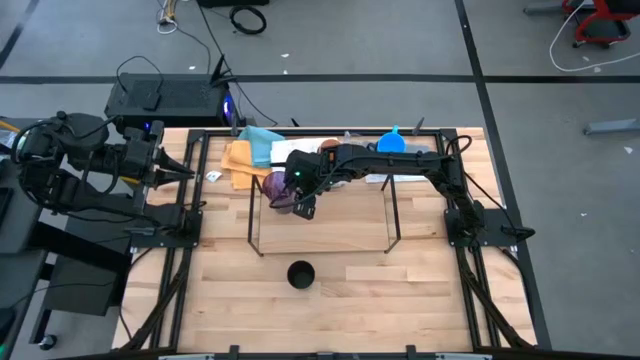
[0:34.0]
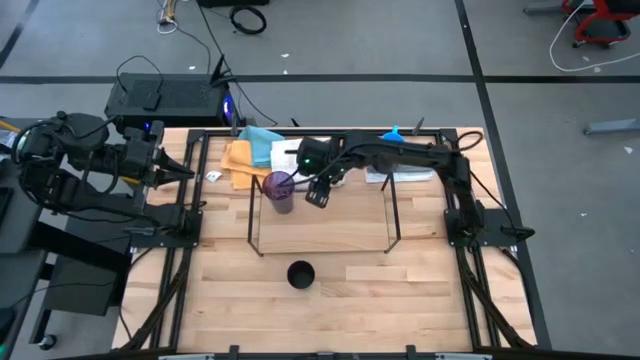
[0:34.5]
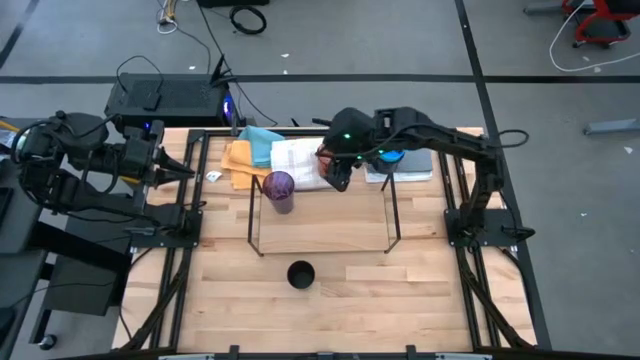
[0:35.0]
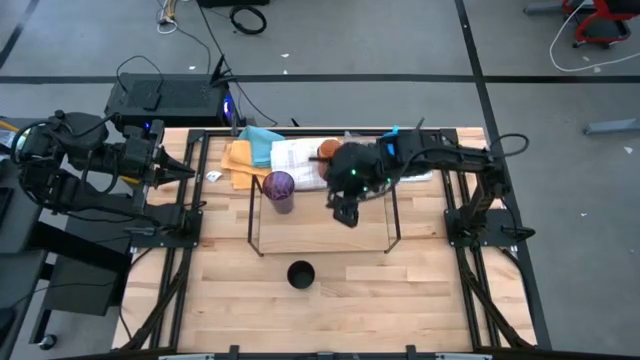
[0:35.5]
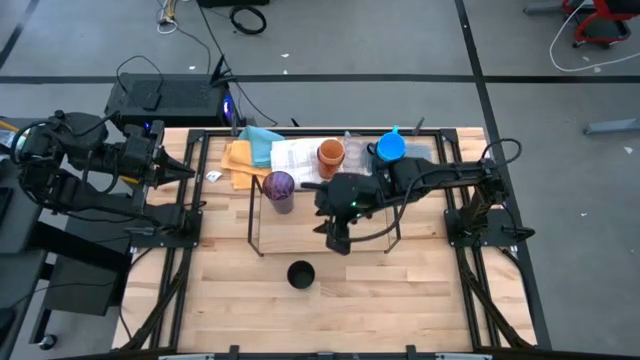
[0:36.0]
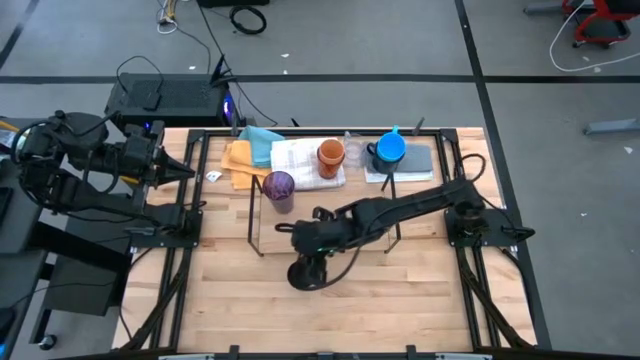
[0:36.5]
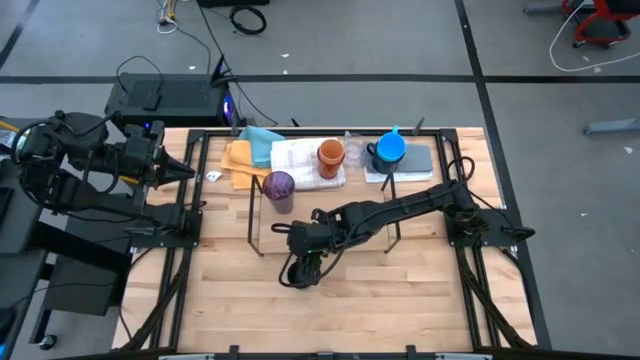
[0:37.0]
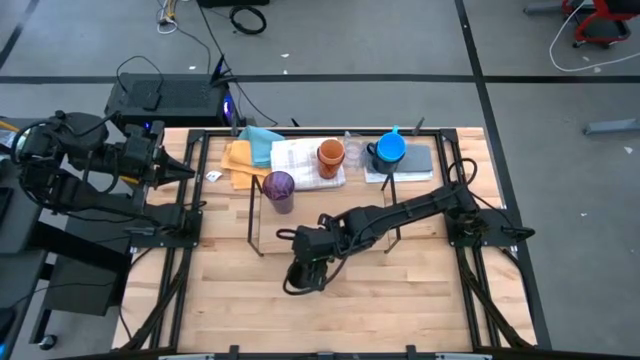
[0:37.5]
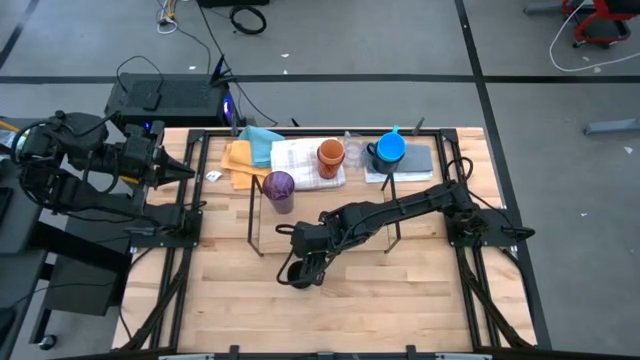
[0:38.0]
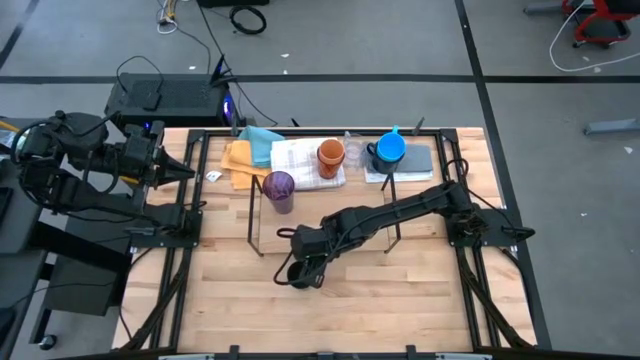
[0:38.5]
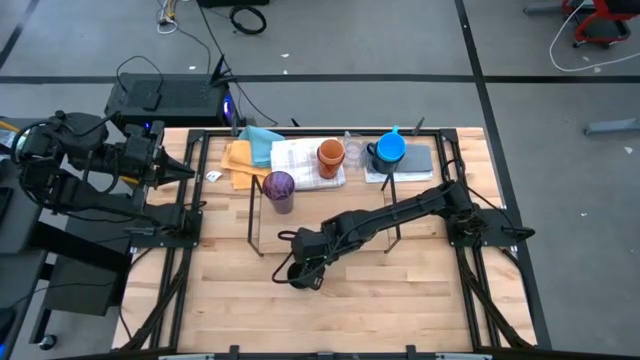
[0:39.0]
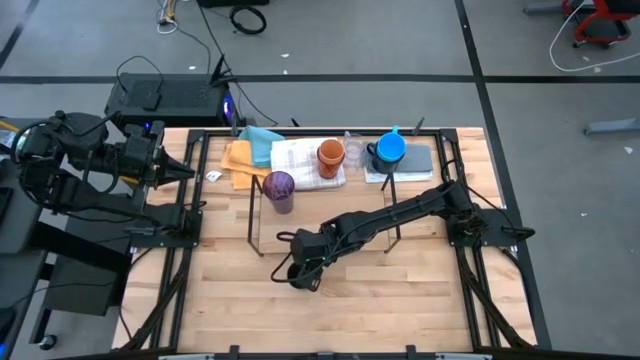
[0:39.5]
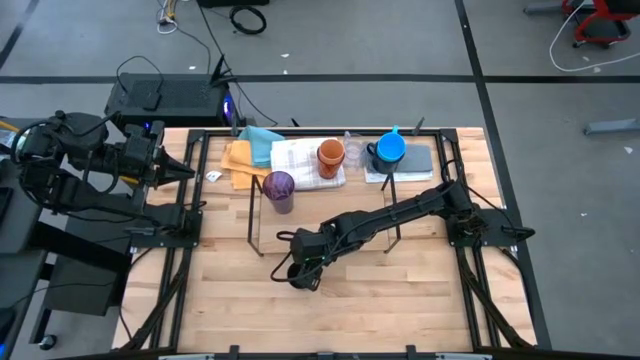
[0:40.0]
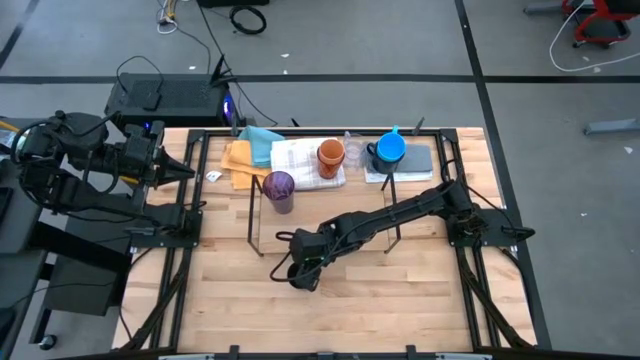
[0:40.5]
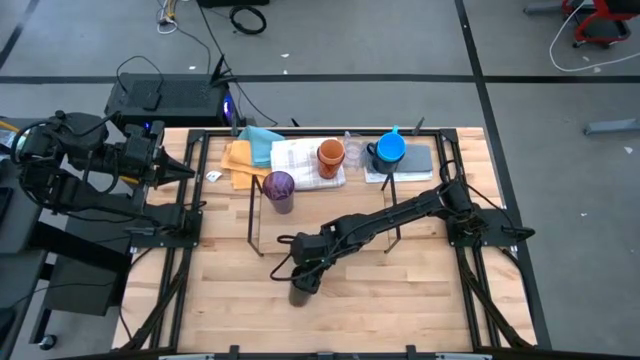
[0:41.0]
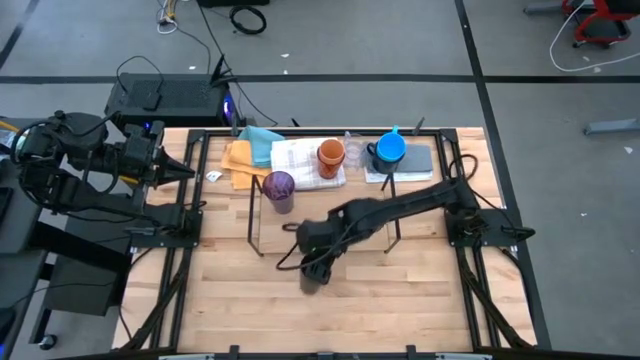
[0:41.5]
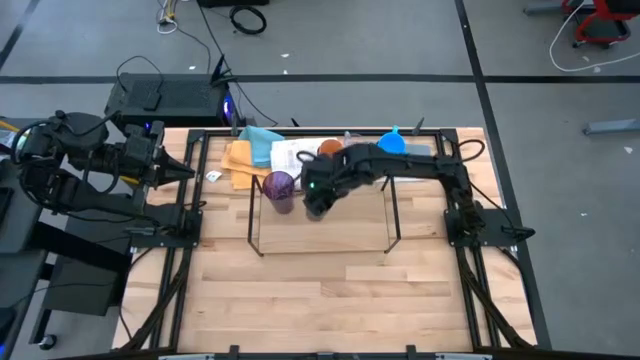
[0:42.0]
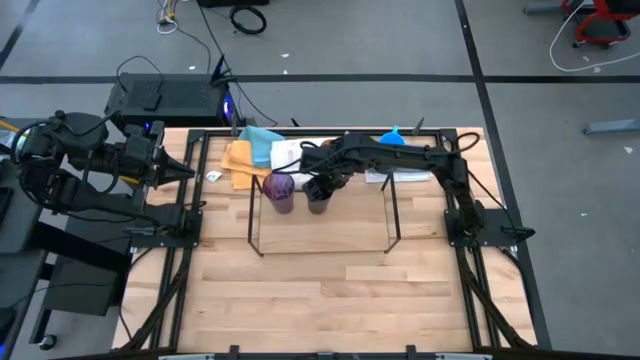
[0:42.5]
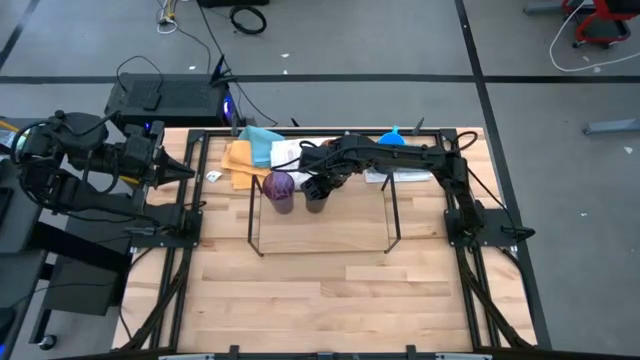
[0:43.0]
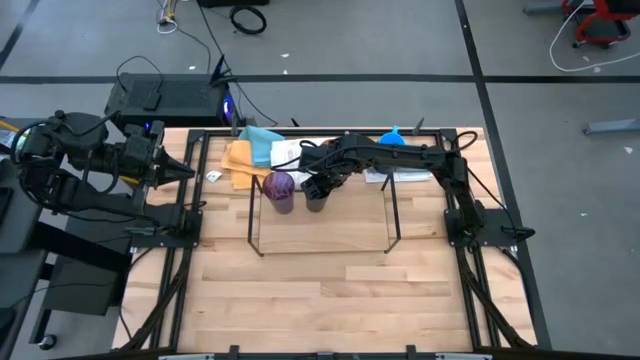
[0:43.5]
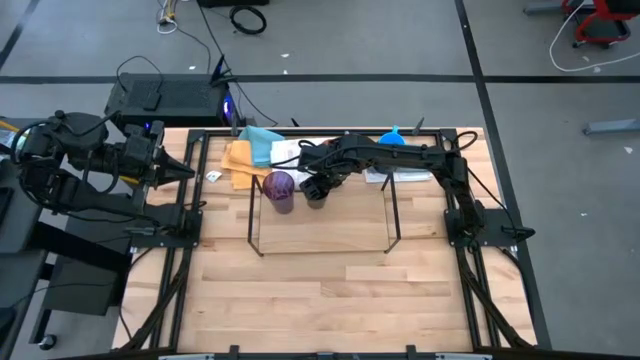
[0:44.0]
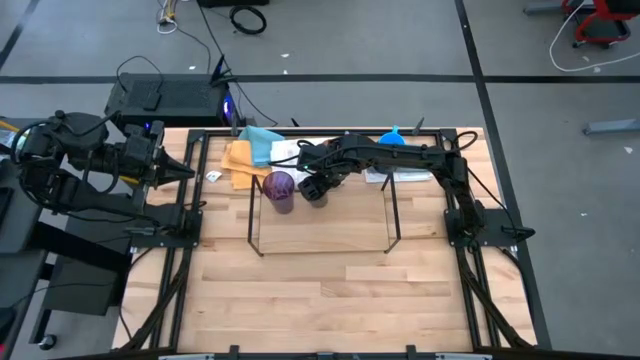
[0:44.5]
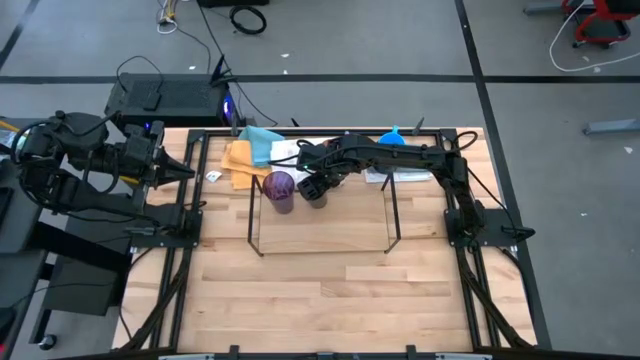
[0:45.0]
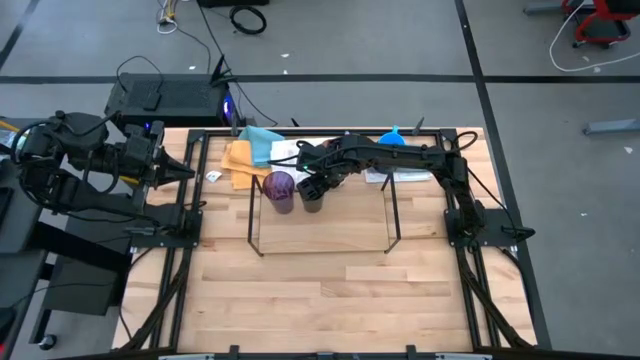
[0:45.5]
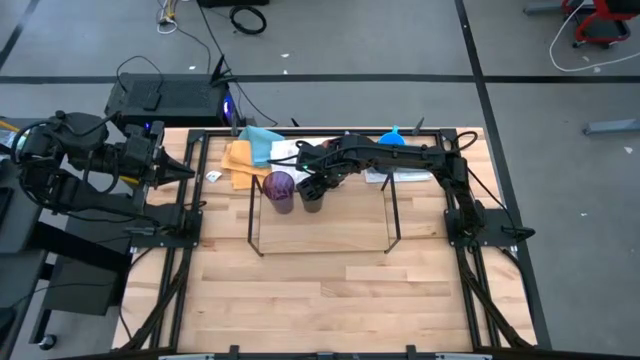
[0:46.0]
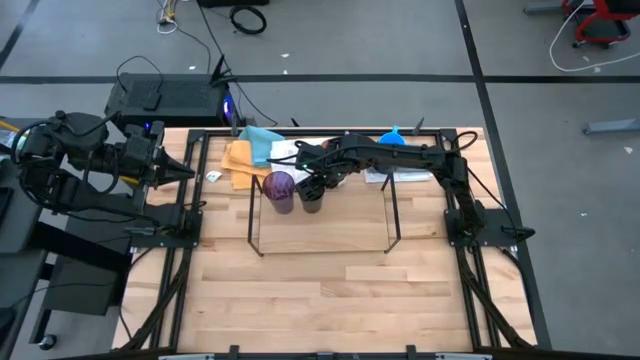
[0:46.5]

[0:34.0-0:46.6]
Task: Stack small to large cups/mugs on shelf
Put the black cup on the shelf

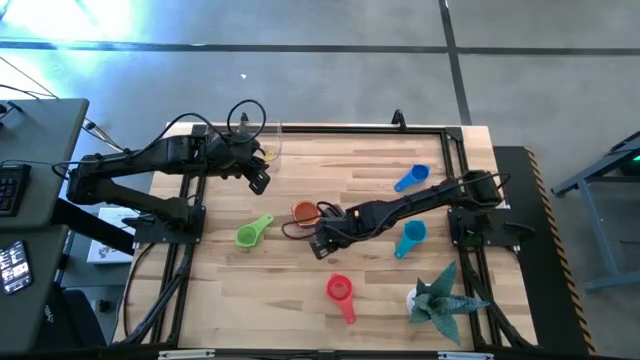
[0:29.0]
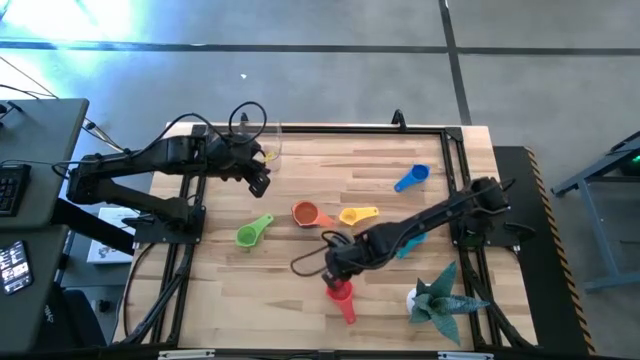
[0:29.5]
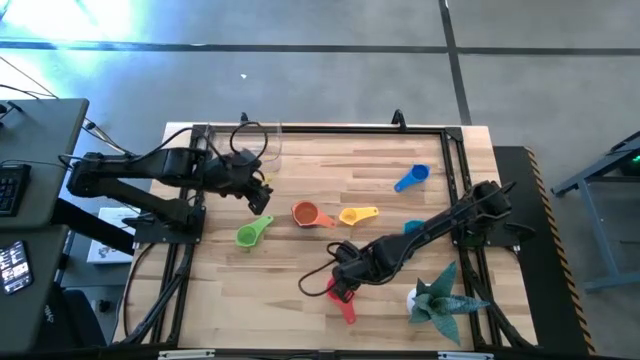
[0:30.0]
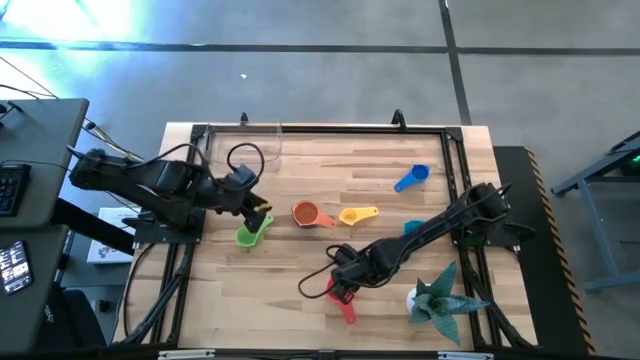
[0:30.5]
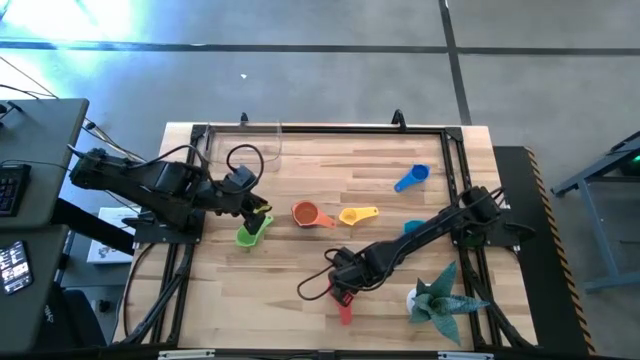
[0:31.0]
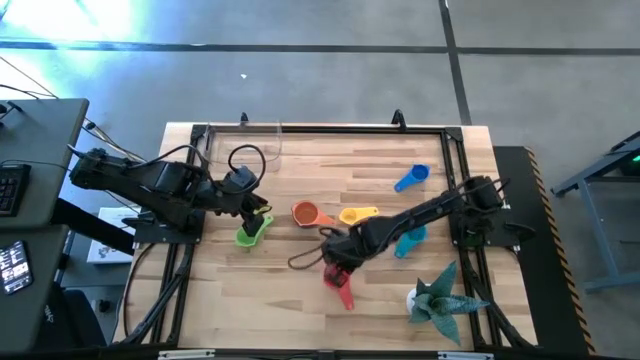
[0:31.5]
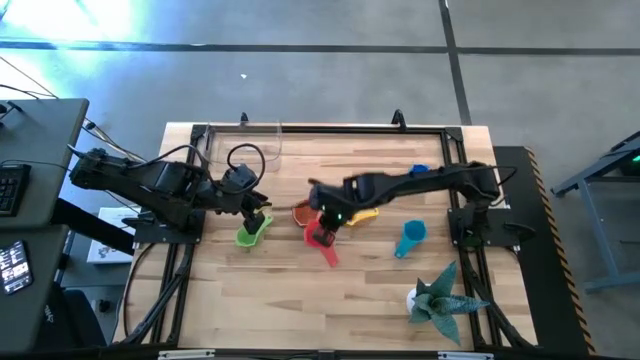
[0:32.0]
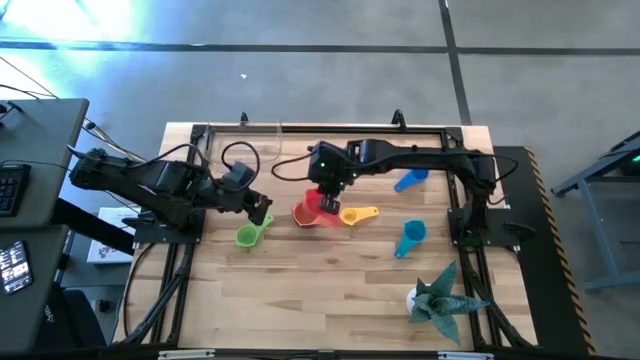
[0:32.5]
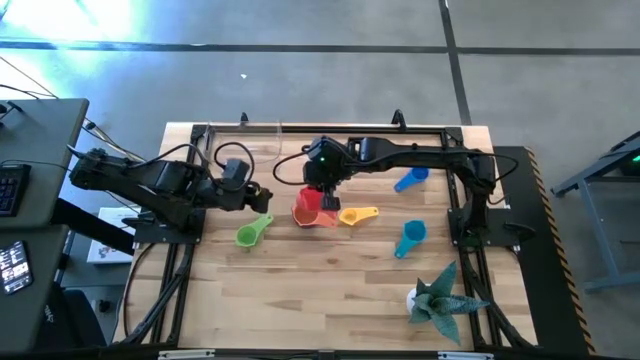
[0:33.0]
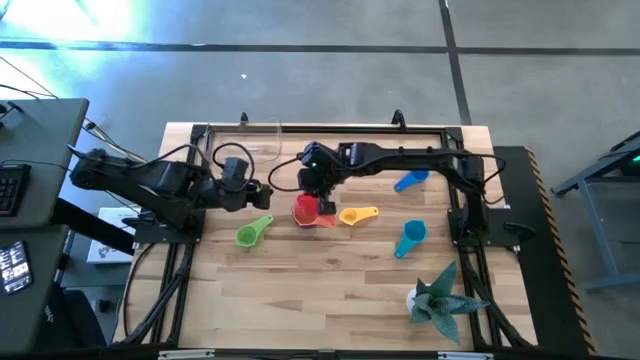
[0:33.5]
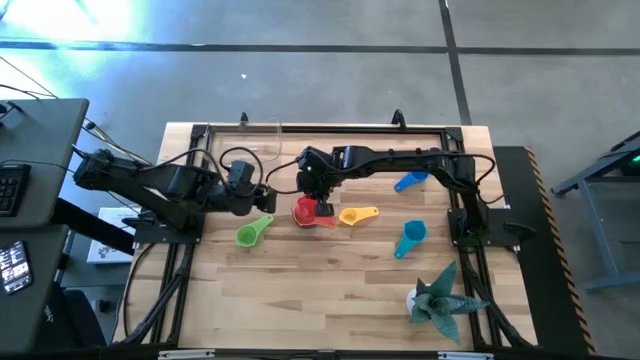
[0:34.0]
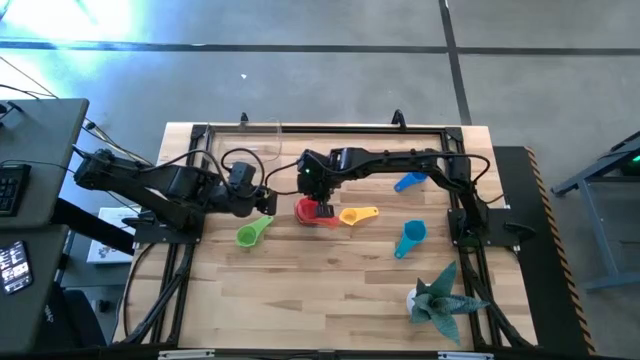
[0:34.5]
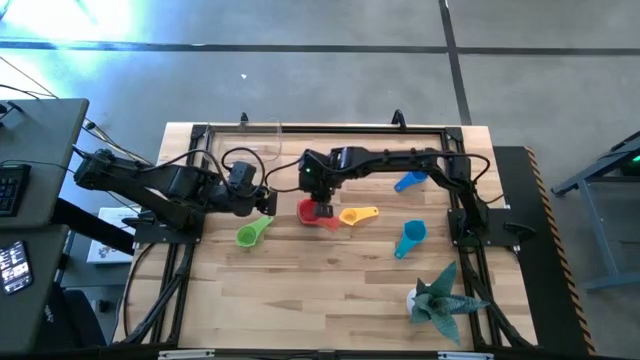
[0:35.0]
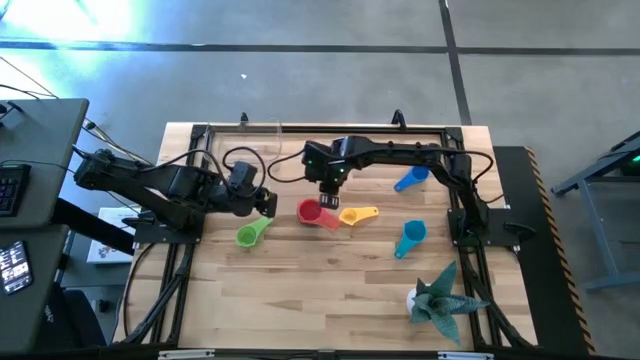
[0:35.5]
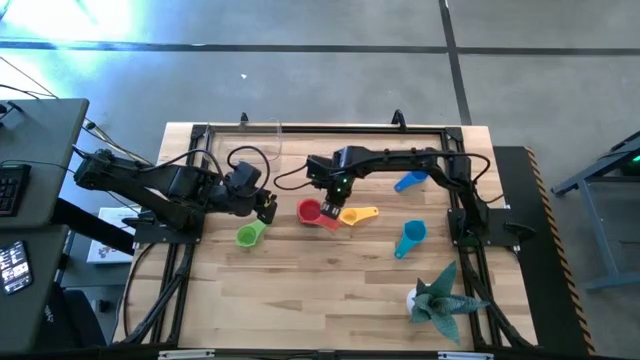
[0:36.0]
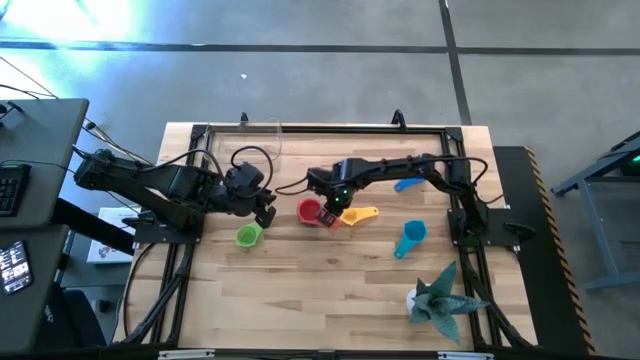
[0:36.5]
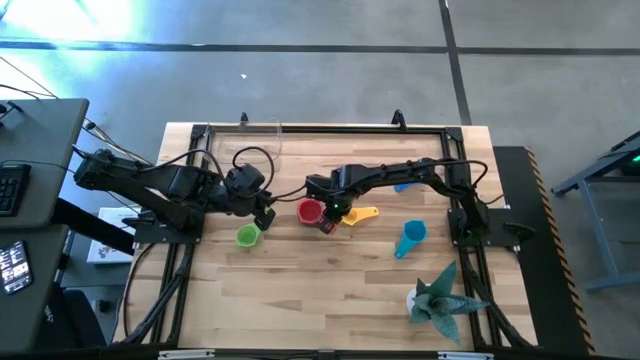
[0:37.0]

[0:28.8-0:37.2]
Task: Nest measuring cups in basket
Stack the red measuring cup on top of the orange measuring cup
